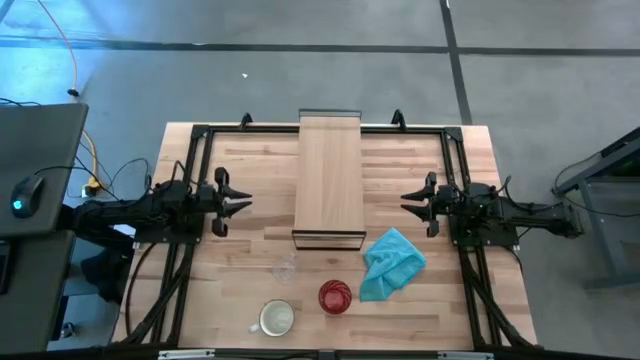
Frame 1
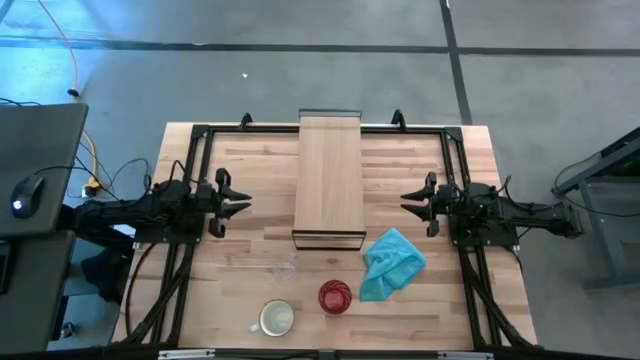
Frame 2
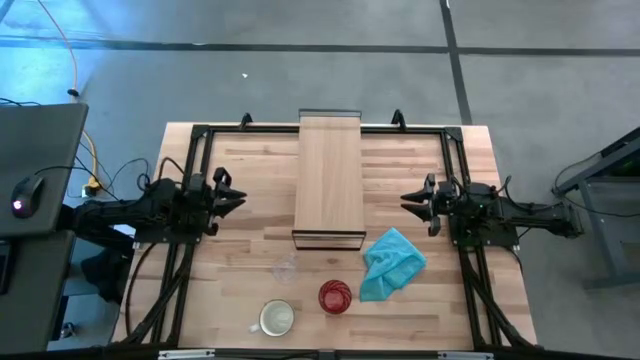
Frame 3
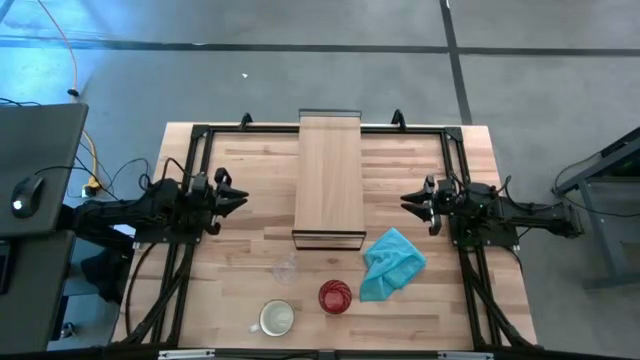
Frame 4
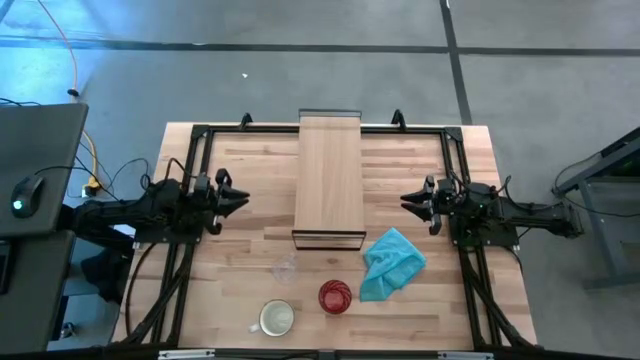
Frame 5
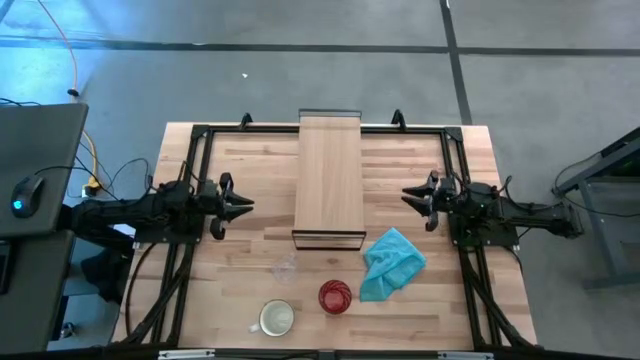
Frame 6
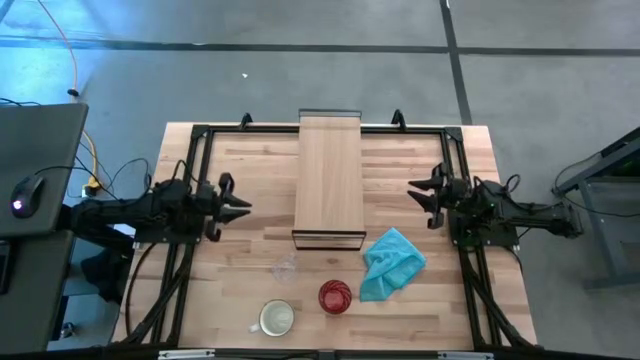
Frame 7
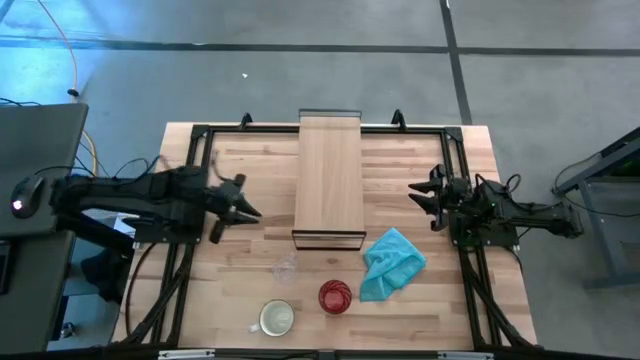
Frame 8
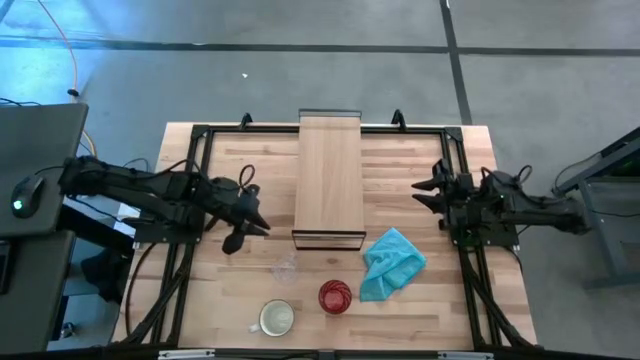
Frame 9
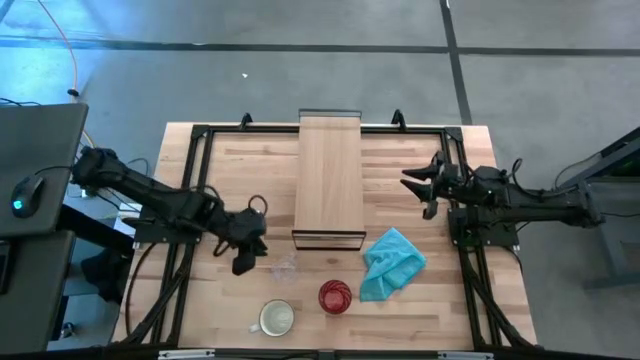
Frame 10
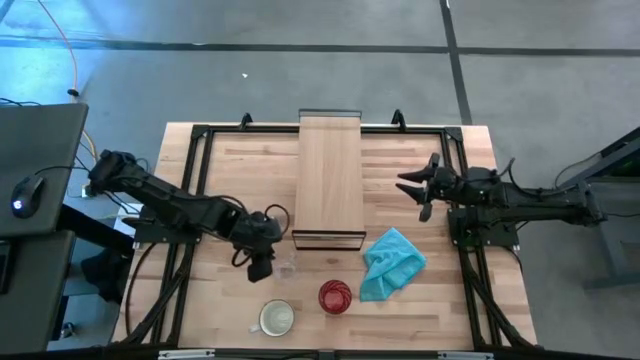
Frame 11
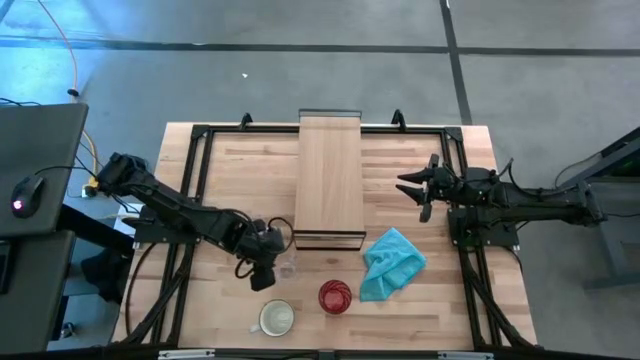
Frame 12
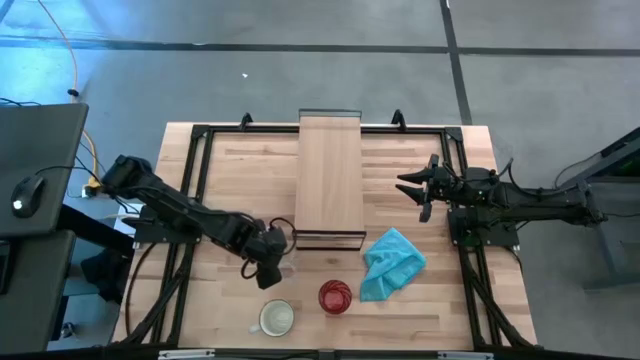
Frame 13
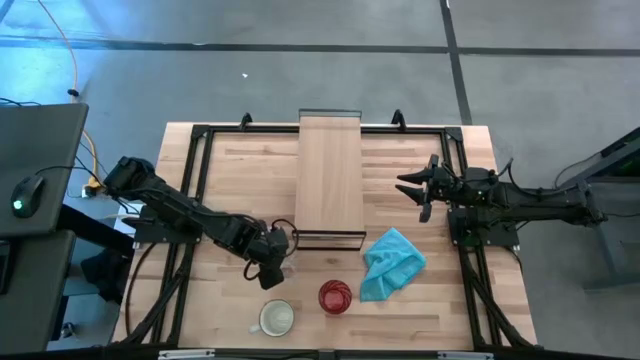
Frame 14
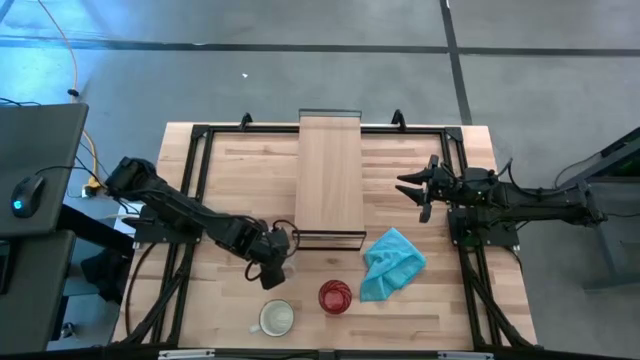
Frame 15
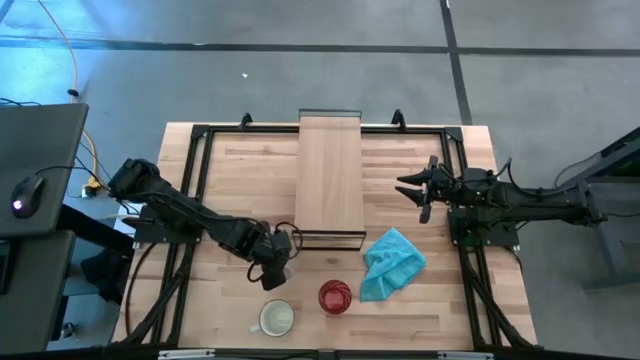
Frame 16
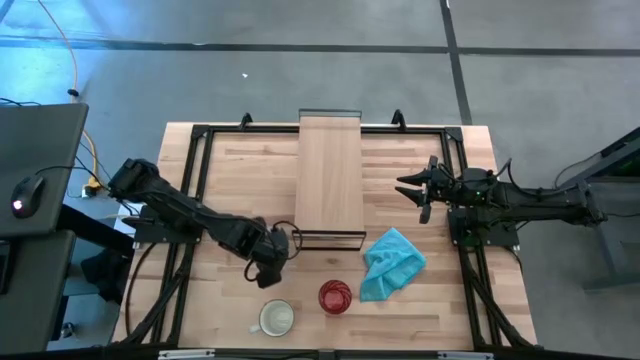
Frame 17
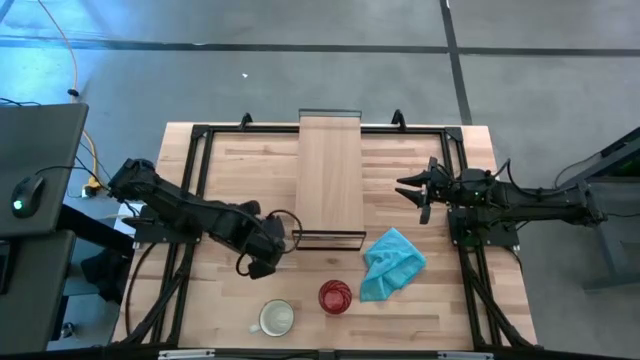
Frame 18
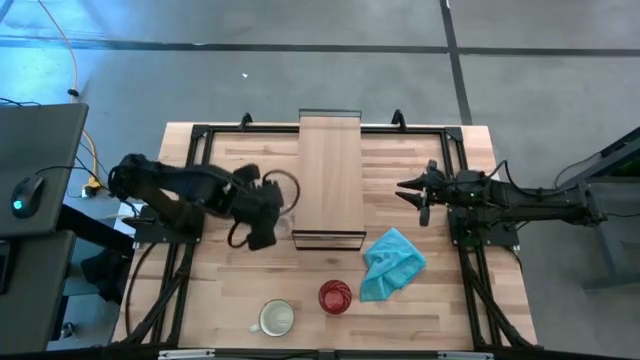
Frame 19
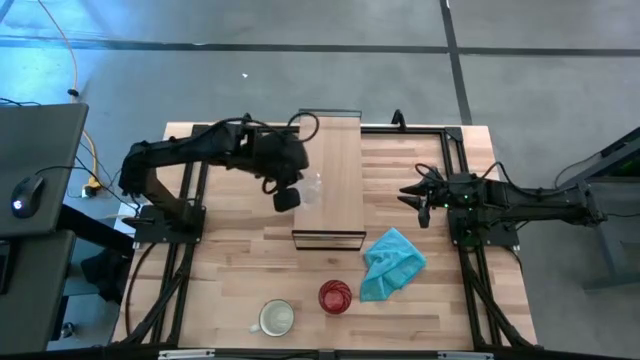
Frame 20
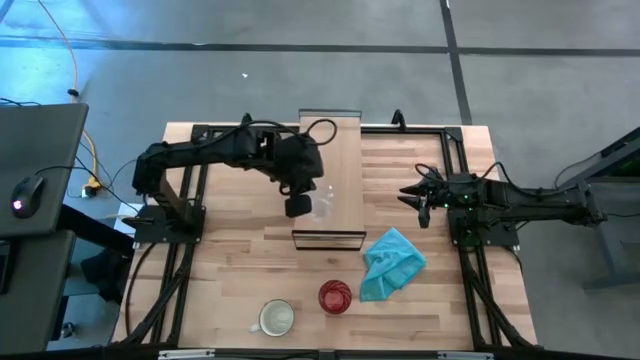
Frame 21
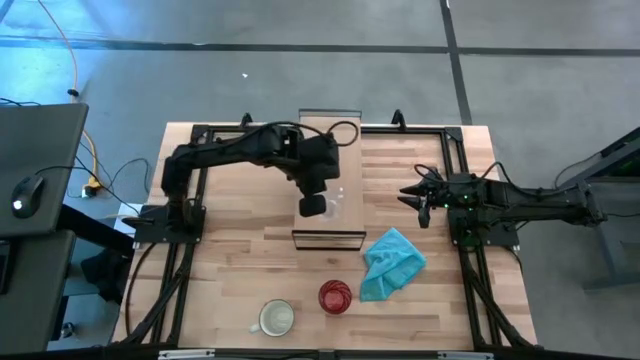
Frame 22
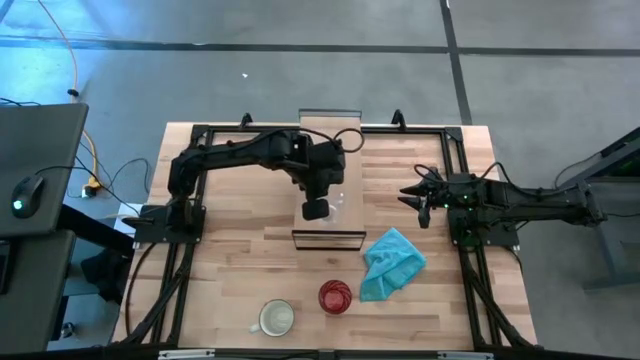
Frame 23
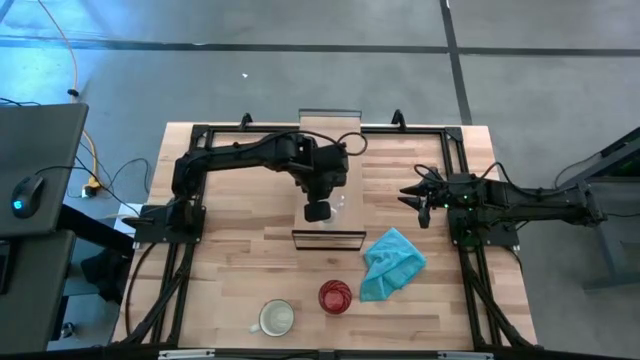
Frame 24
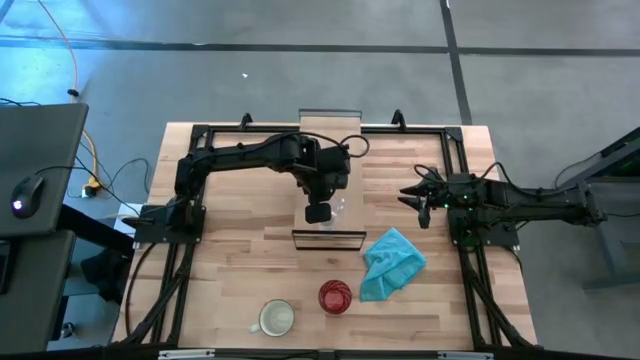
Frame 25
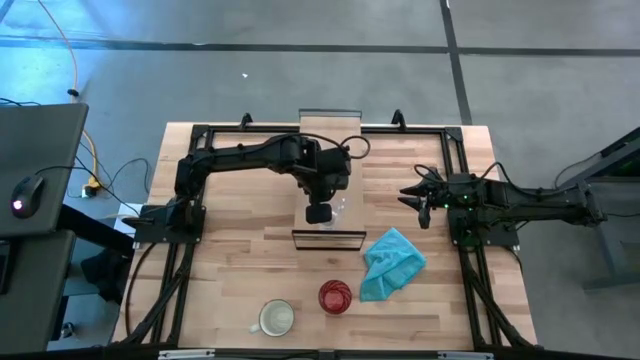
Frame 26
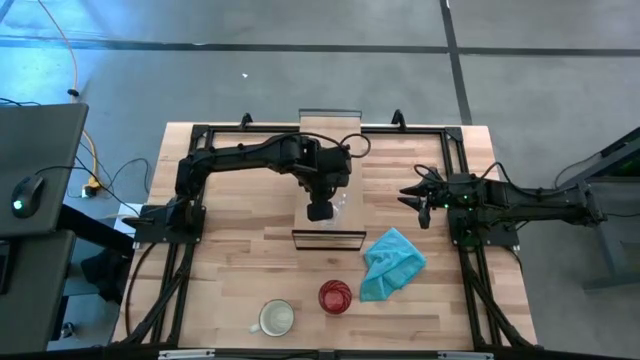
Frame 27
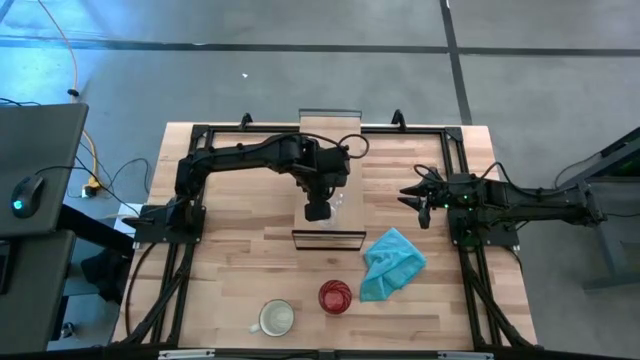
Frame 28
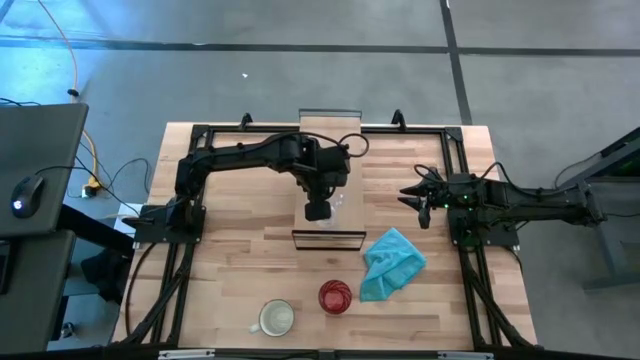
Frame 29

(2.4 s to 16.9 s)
Task: Stack small to large cups/mugs on shelf
Put the transparent mug on the shelf

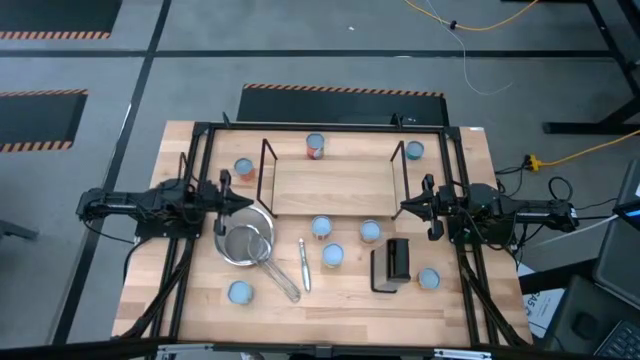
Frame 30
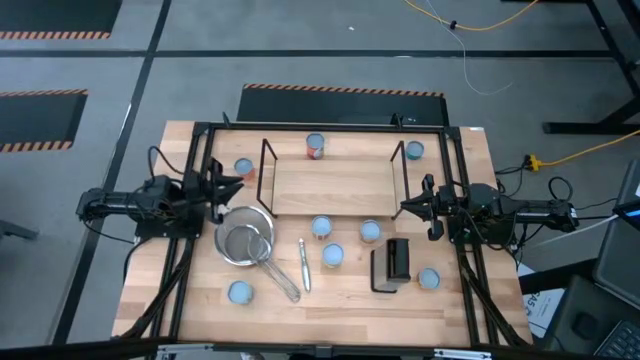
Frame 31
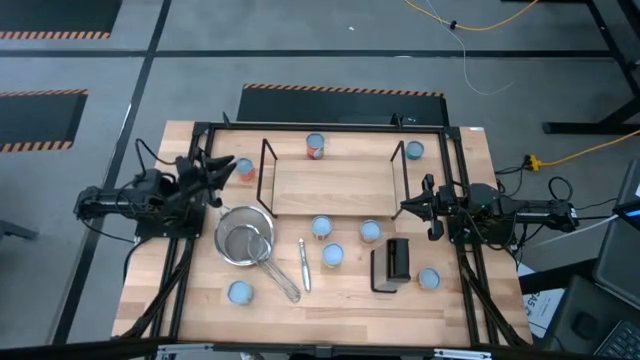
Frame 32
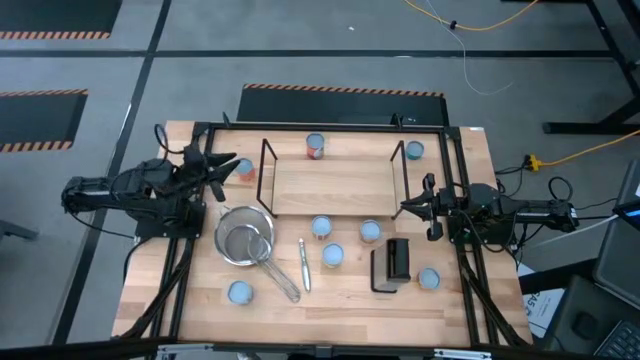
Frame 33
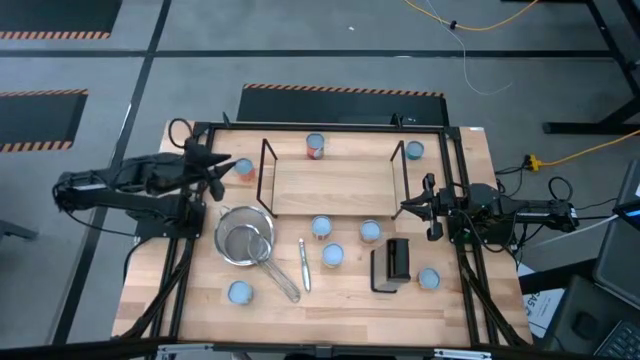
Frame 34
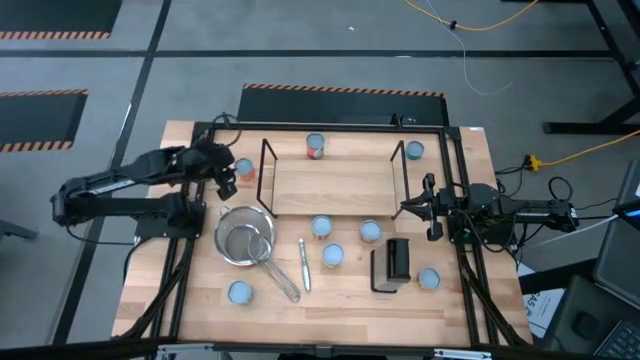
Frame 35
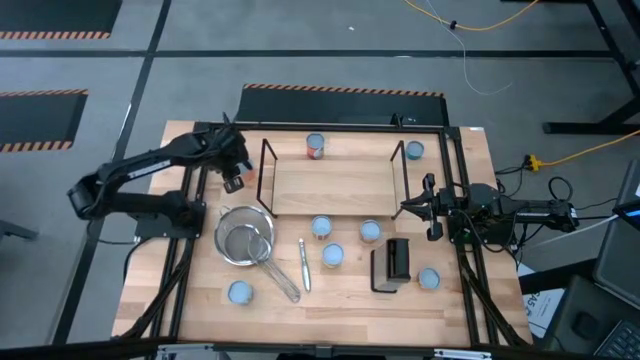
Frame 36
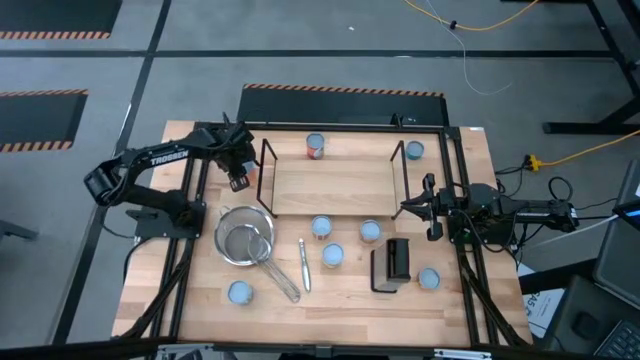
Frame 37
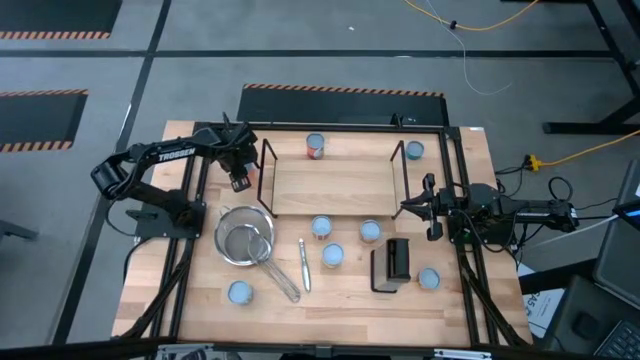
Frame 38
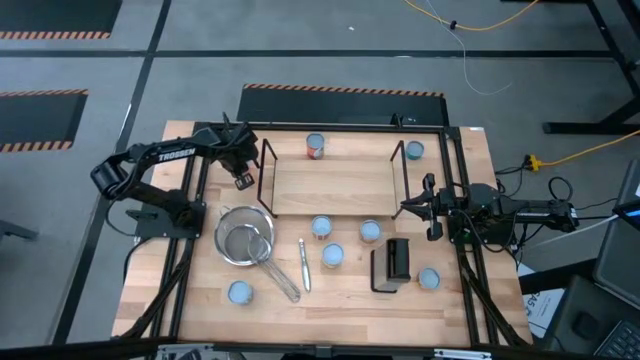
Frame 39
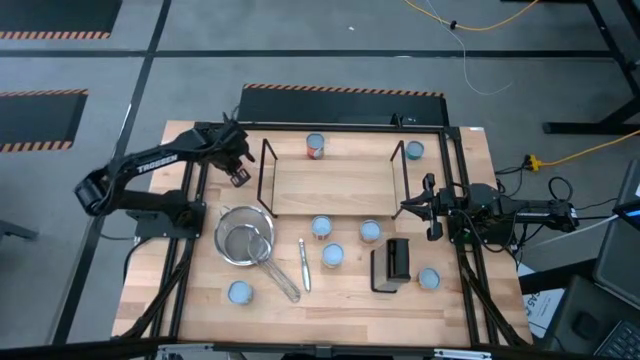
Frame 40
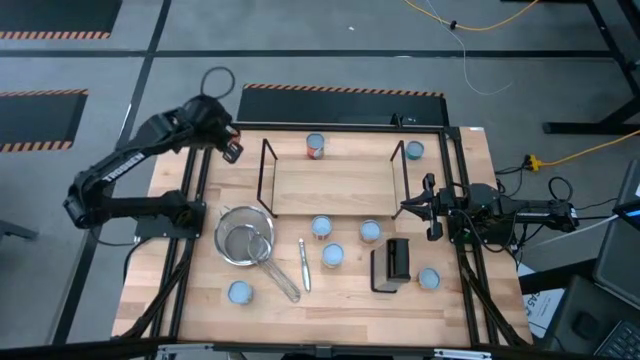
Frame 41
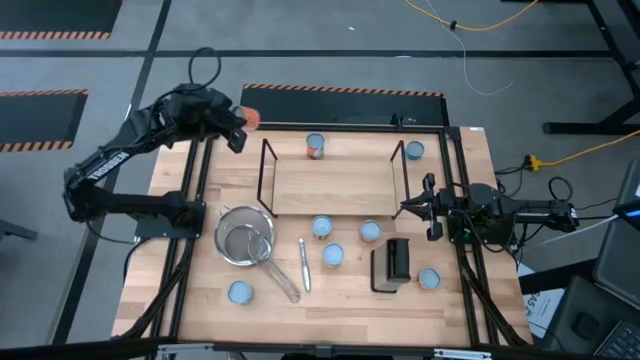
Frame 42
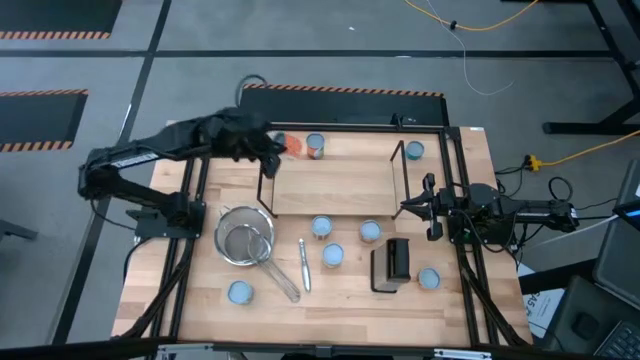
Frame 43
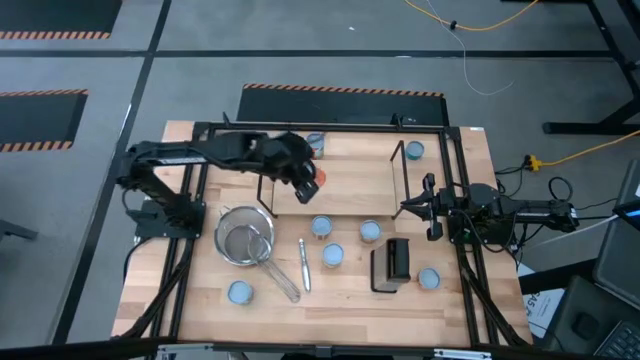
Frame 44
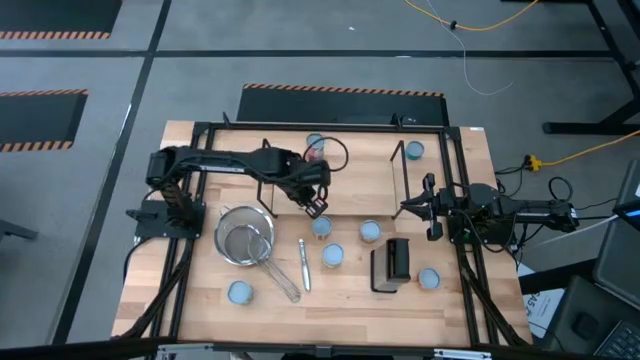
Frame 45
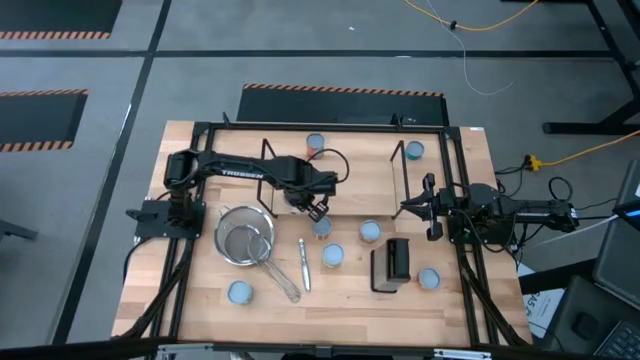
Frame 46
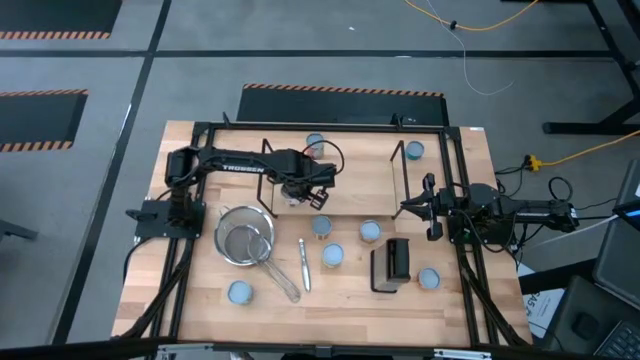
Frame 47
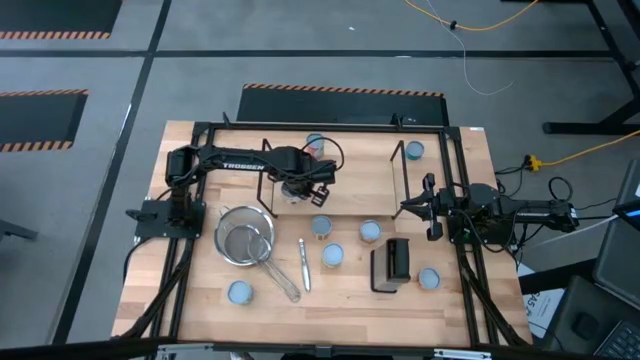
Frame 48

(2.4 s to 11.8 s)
Task: Pick and place cans onto a shelf
Put the orange can on the shelf
